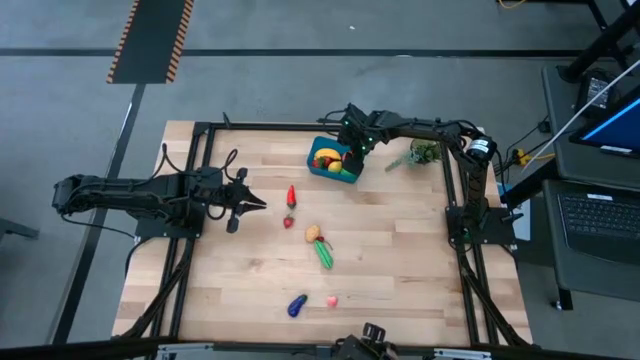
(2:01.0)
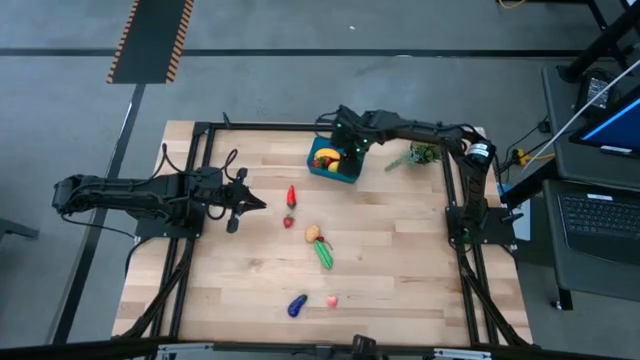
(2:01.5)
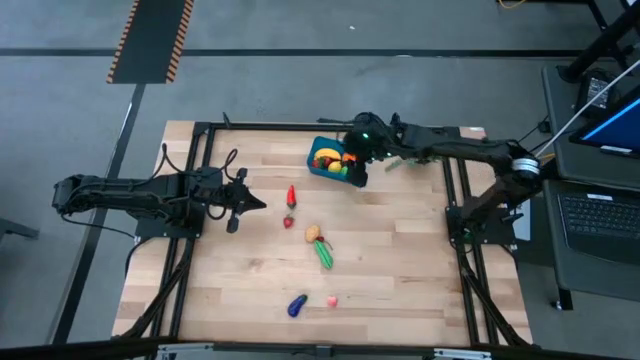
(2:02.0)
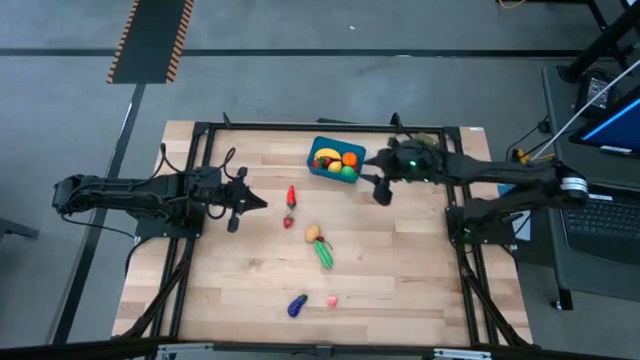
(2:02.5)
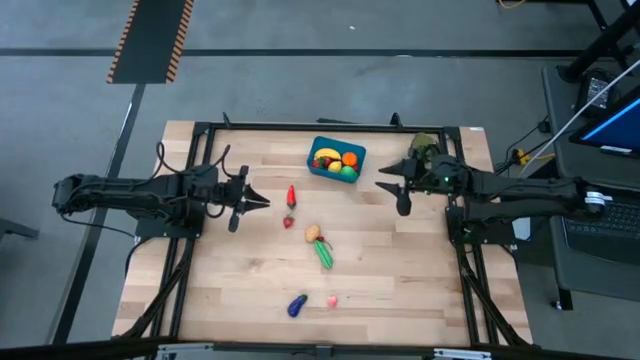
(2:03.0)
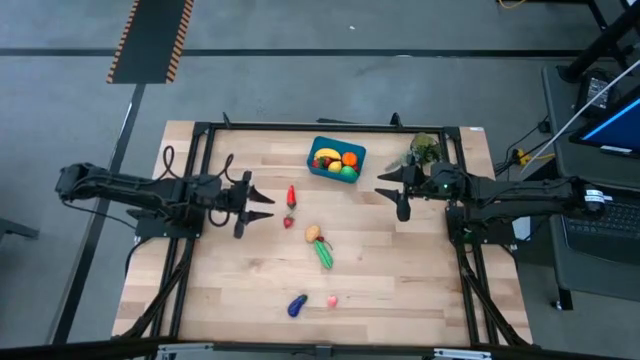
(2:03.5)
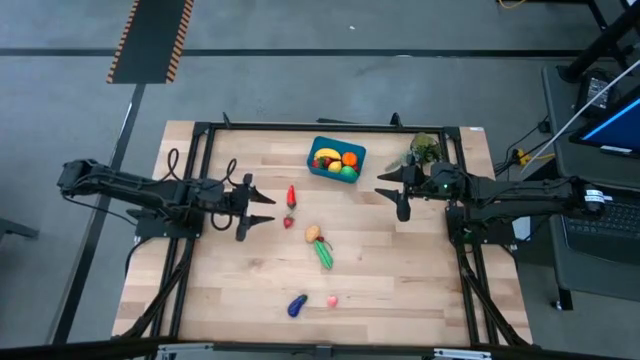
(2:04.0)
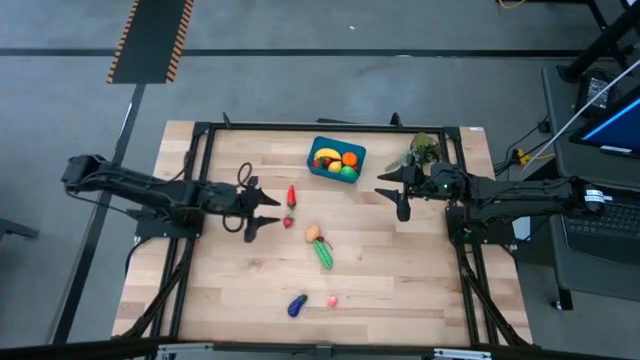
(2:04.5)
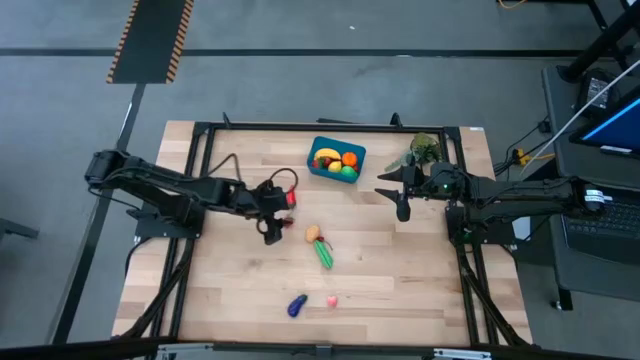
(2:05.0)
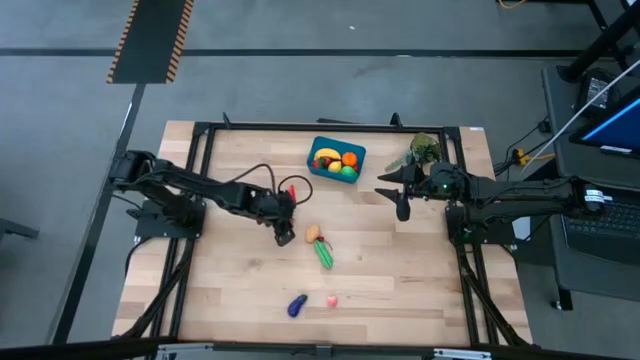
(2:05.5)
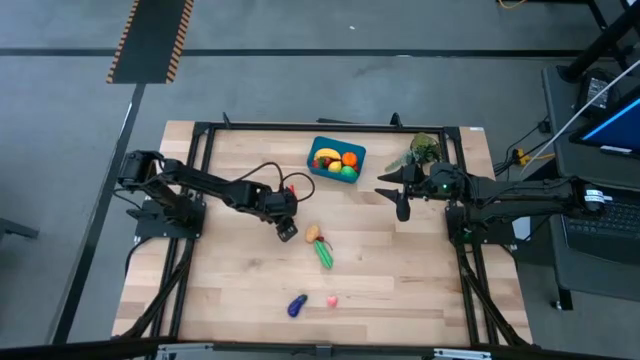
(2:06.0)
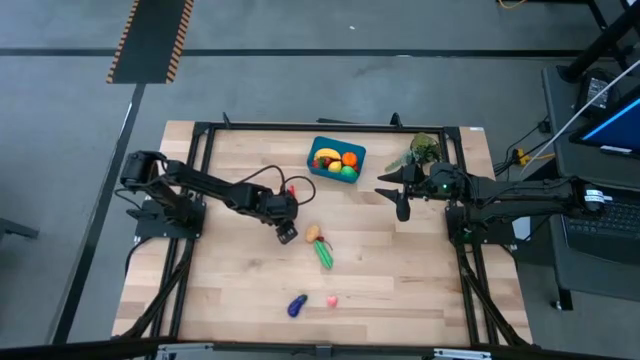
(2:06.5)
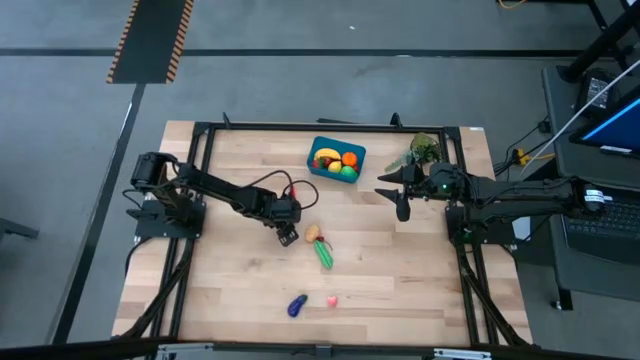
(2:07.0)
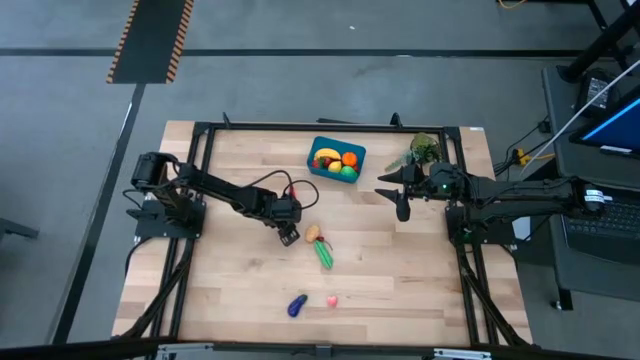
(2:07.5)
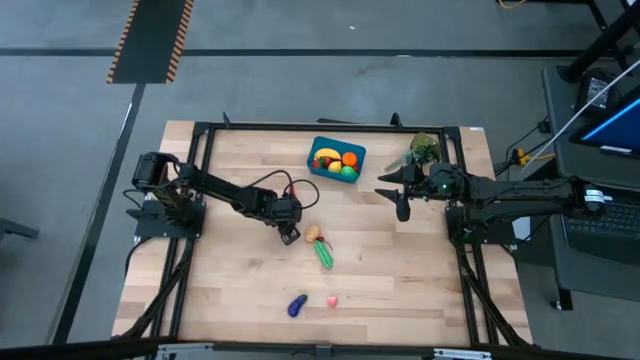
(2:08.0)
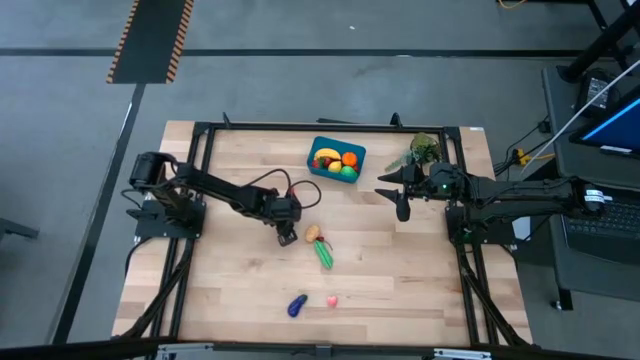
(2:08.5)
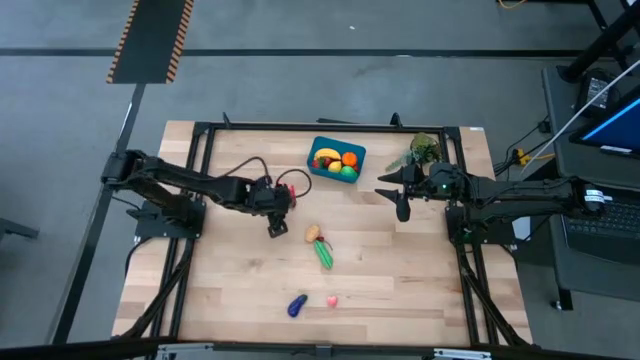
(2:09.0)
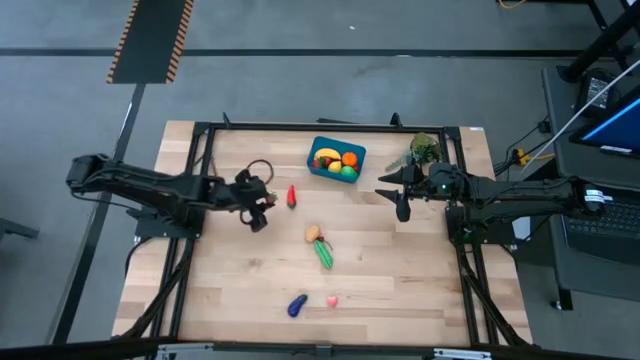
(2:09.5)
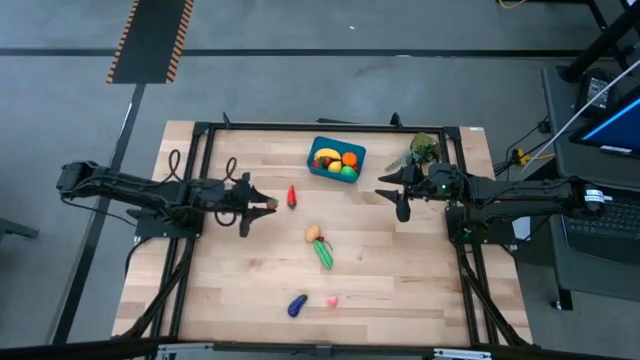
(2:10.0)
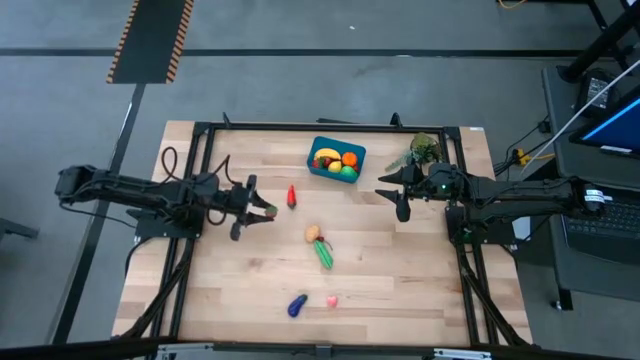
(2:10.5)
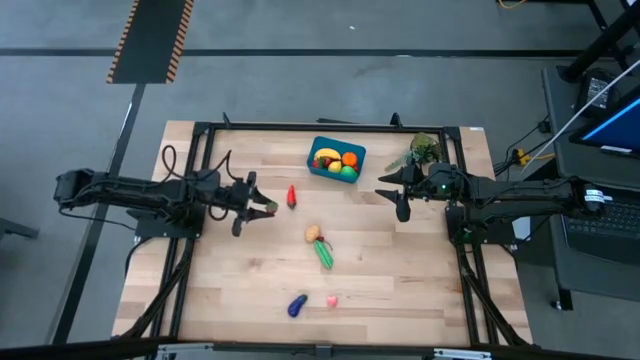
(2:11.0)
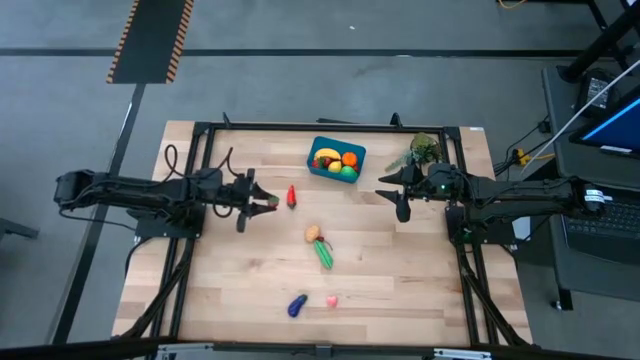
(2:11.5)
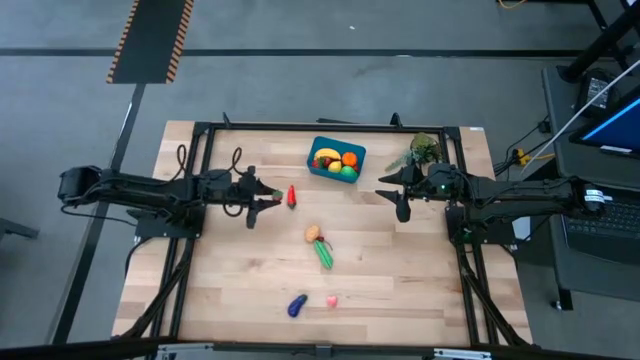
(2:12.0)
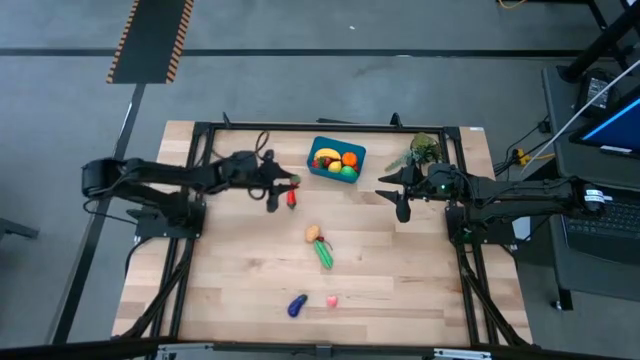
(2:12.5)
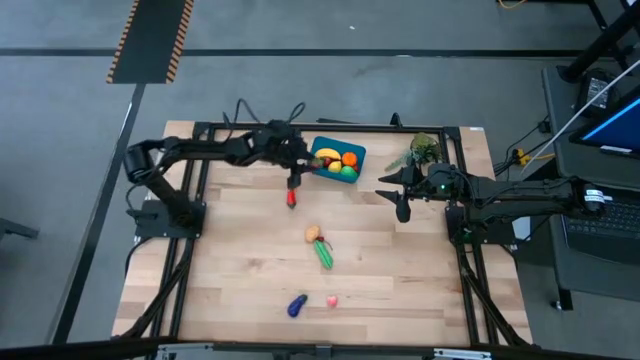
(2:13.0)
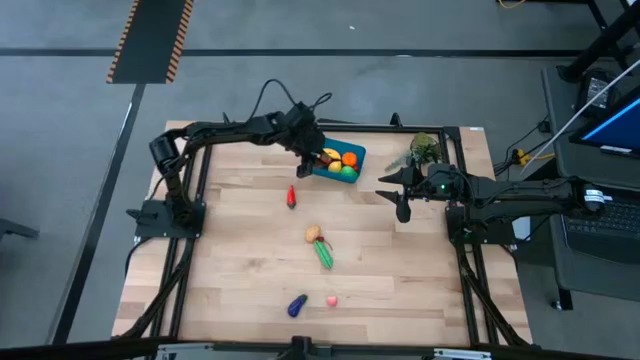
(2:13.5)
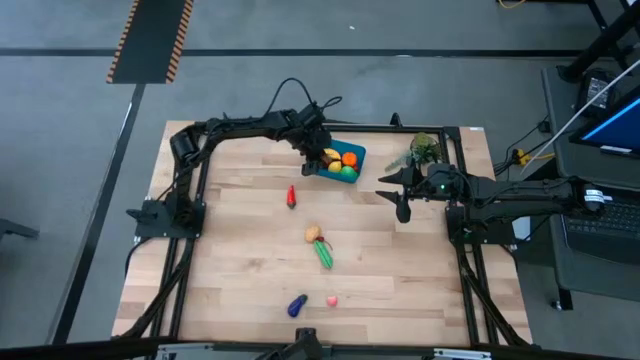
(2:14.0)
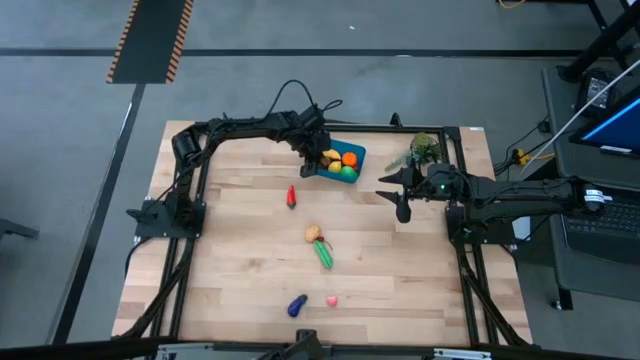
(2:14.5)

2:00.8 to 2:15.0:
Task: Pick and placing Produce into tupperware
Put the red strawberry into the blue bin
